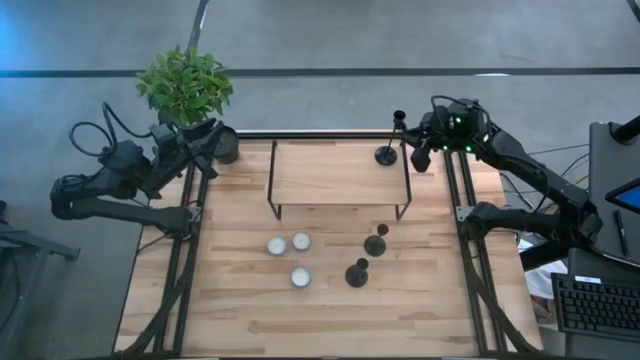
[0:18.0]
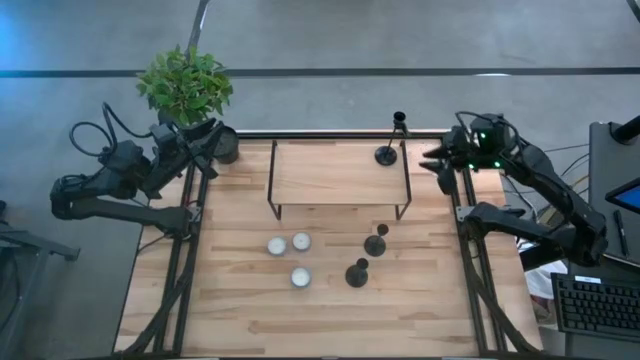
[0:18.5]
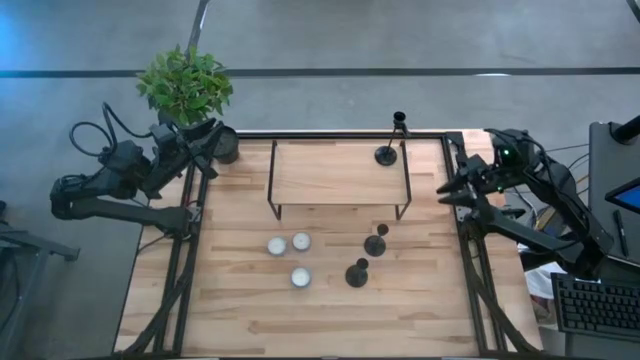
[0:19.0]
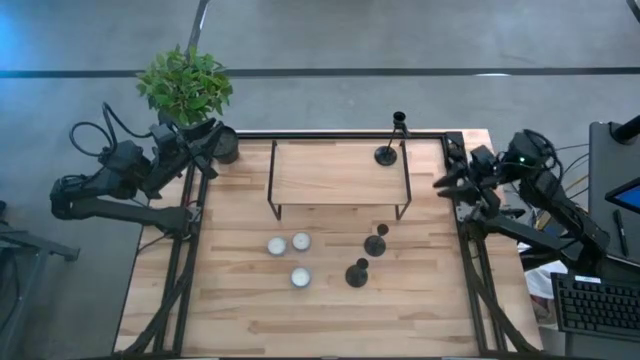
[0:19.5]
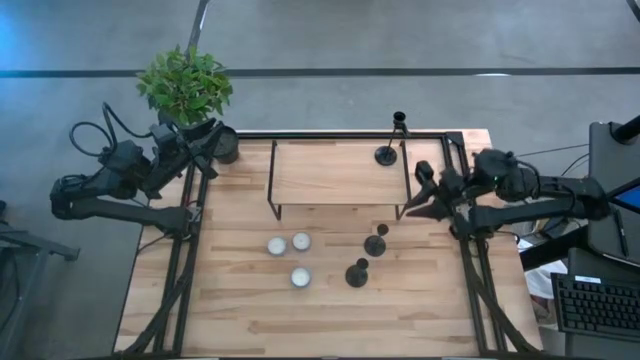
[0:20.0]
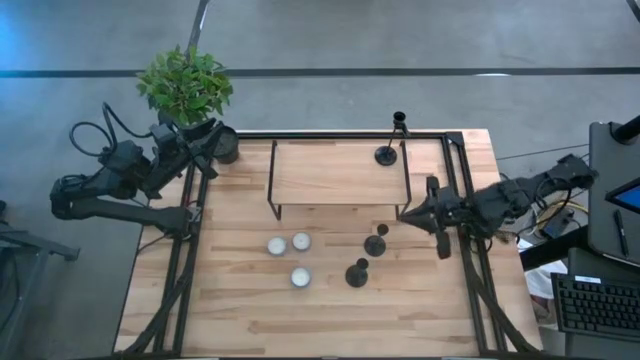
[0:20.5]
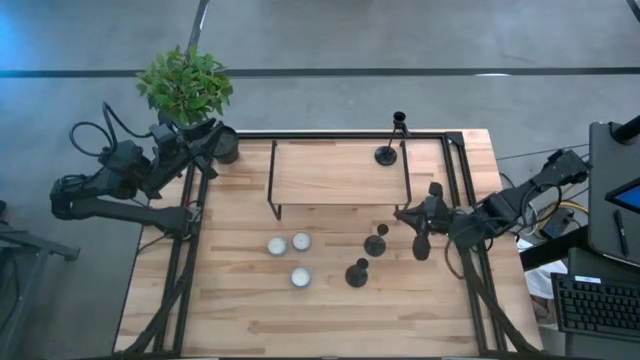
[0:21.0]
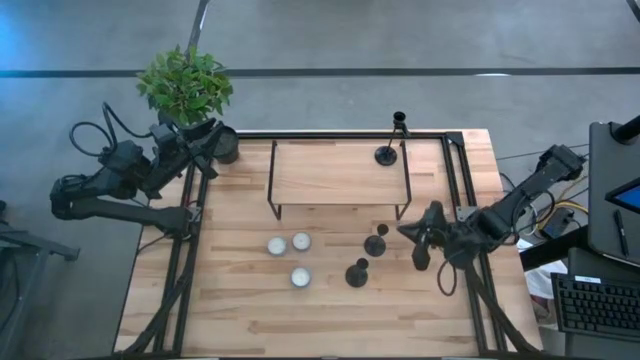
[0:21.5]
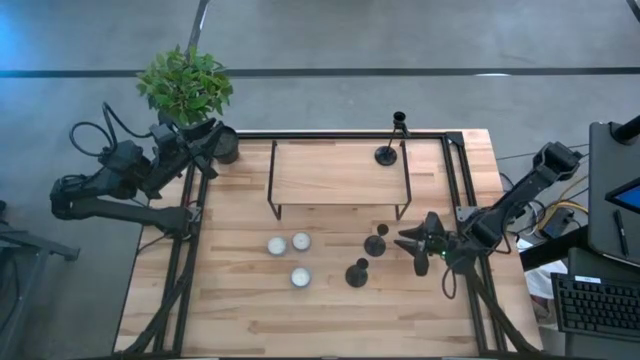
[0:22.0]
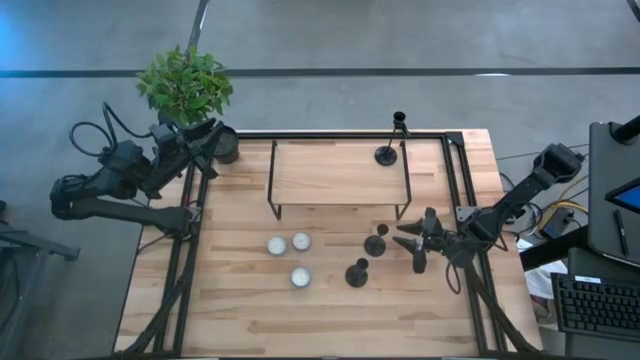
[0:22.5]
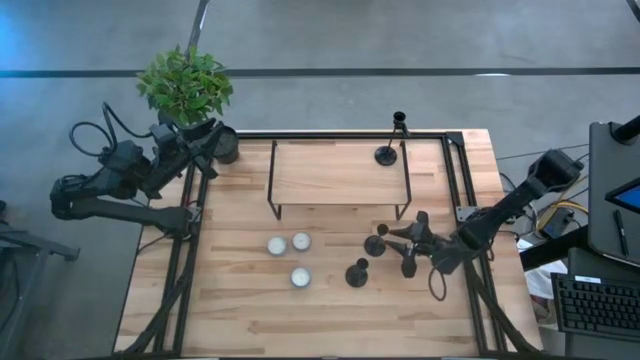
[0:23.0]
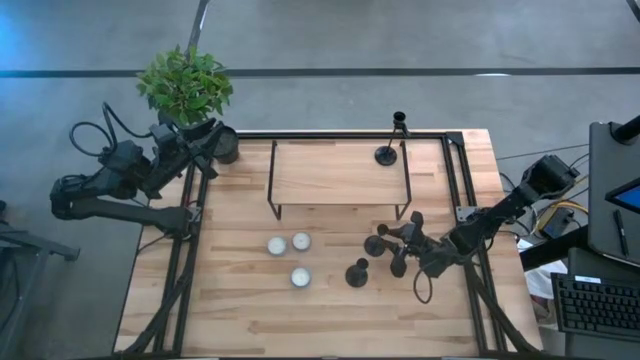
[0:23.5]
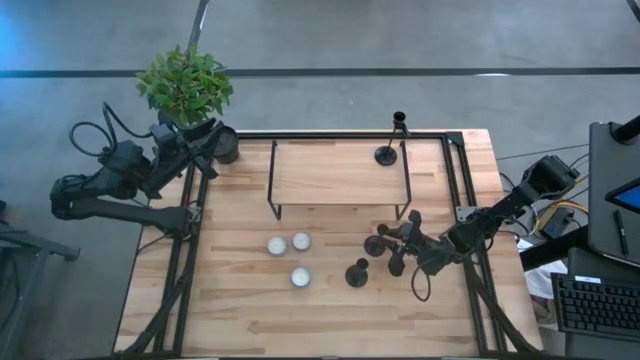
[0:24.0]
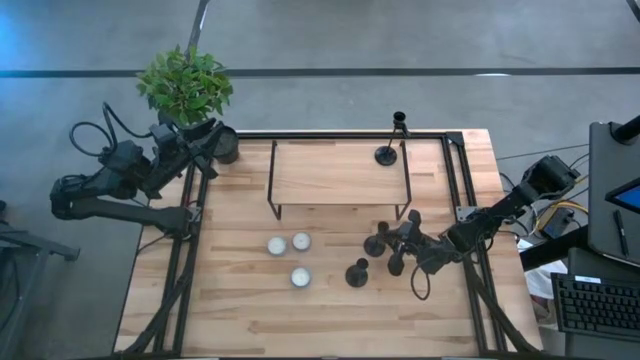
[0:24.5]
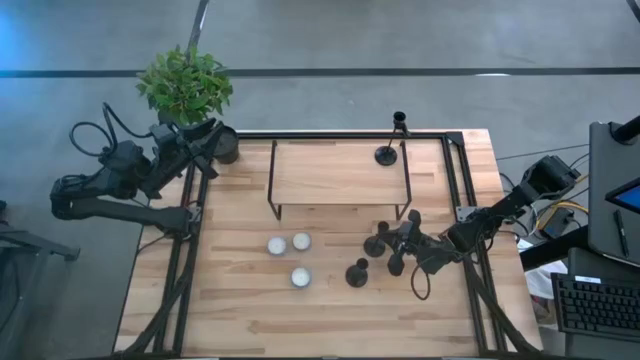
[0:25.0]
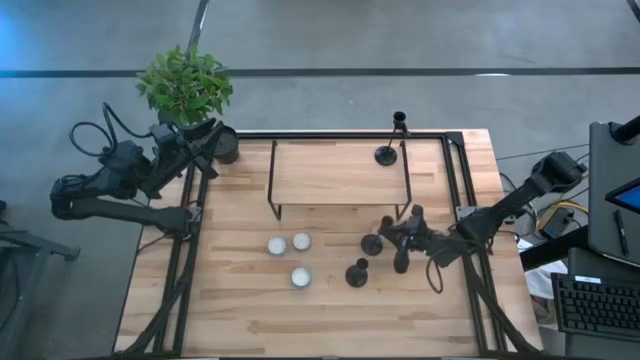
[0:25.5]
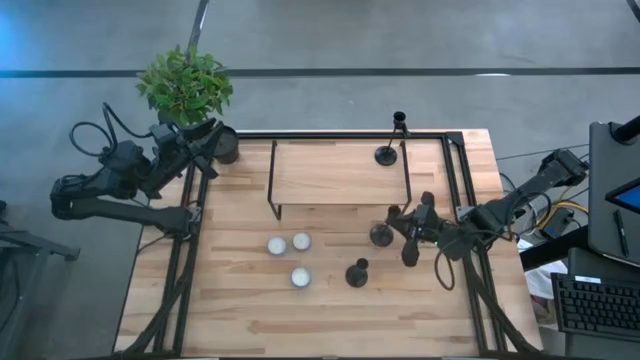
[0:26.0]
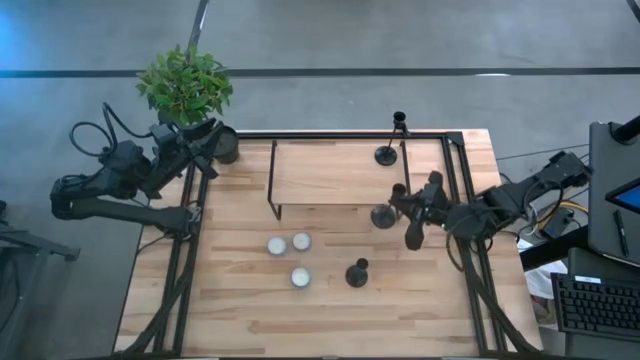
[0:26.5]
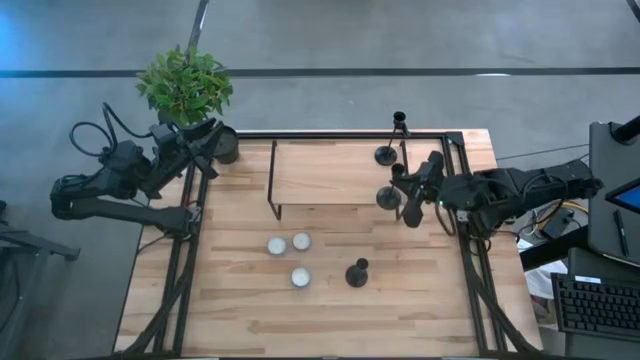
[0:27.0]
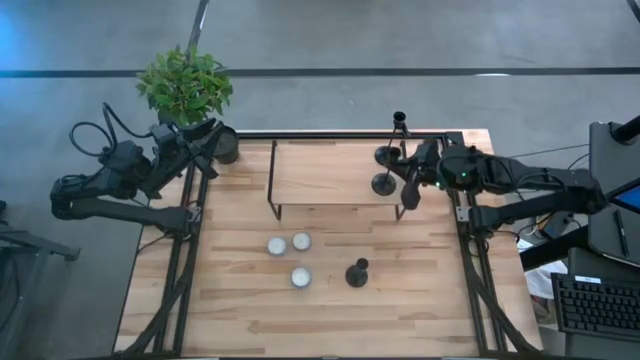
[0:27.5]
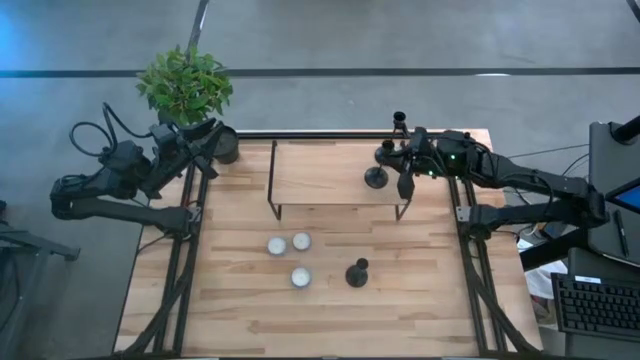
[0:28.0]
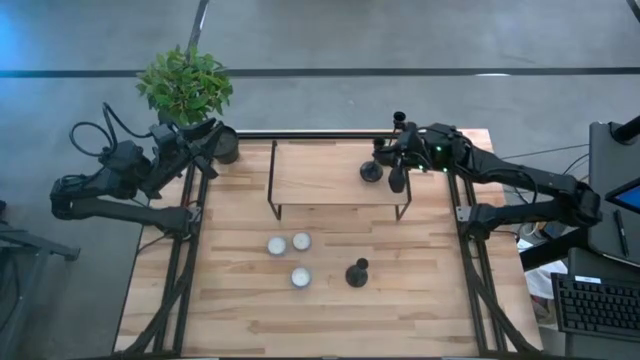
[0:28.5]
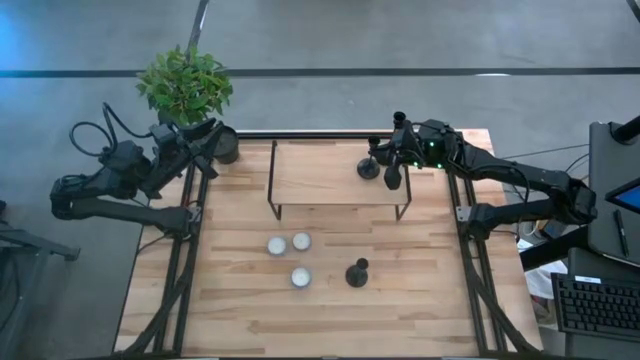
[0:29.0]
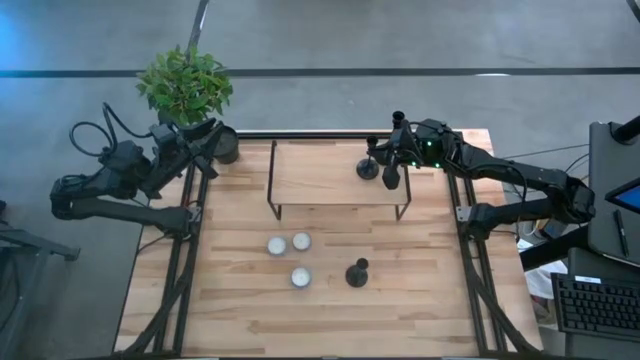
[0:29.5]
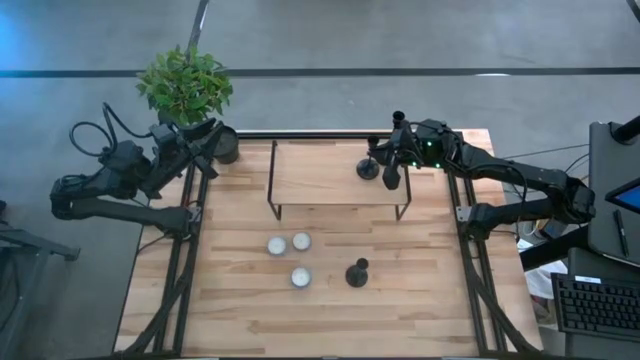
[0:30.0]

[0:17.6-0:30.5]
Task: Pick & Place candle stick holders
Put the top black candle holder on the shelf

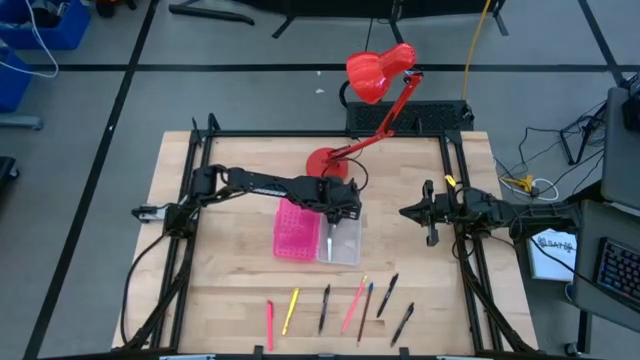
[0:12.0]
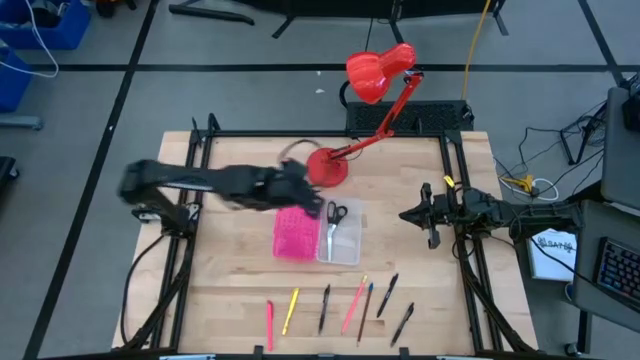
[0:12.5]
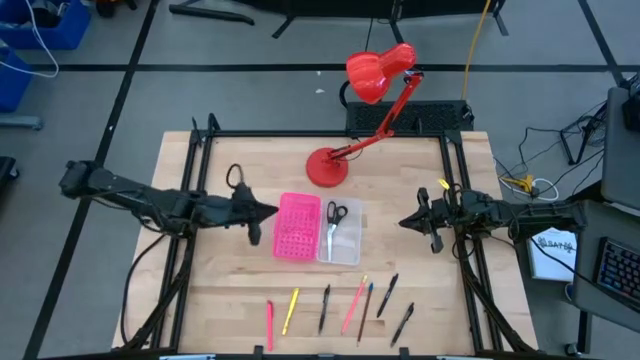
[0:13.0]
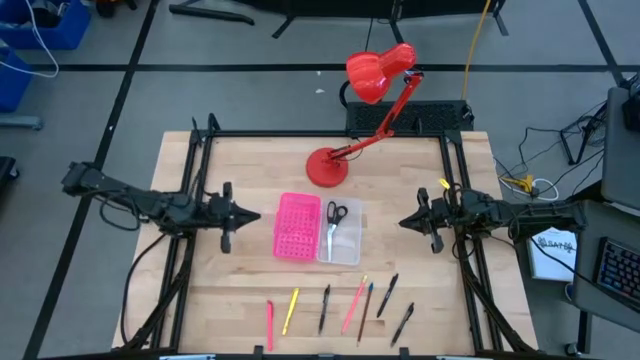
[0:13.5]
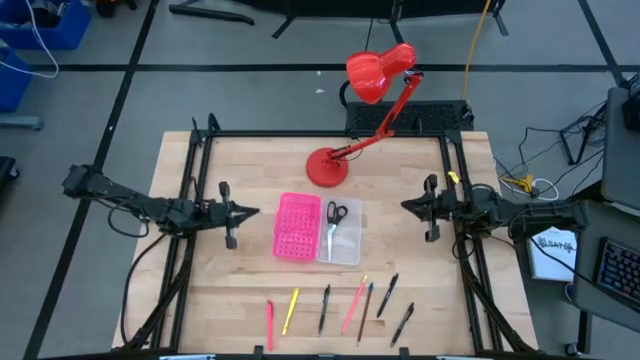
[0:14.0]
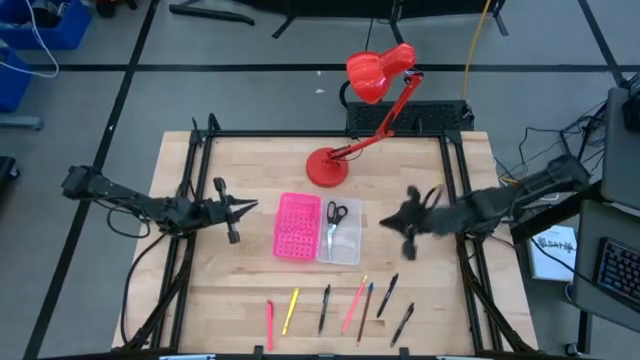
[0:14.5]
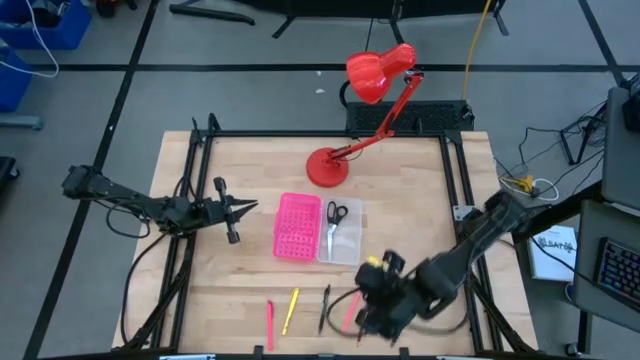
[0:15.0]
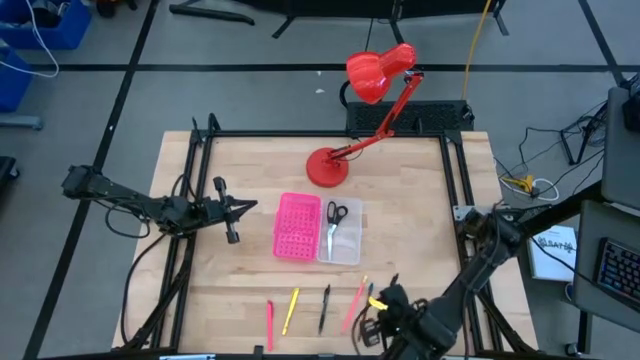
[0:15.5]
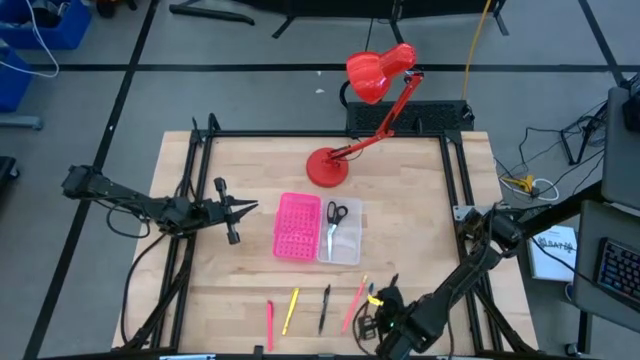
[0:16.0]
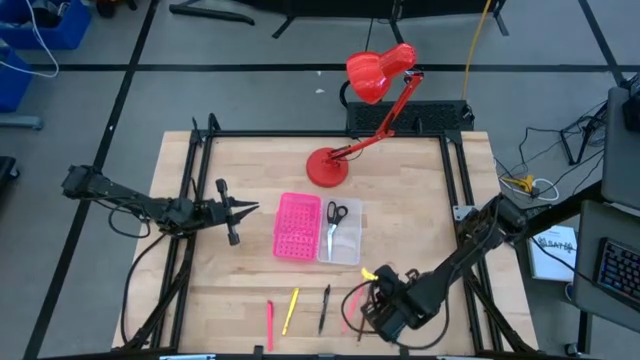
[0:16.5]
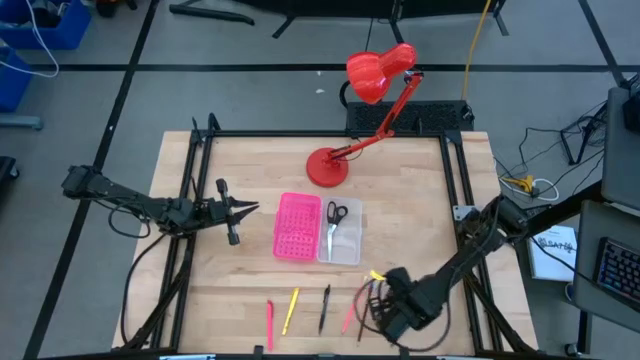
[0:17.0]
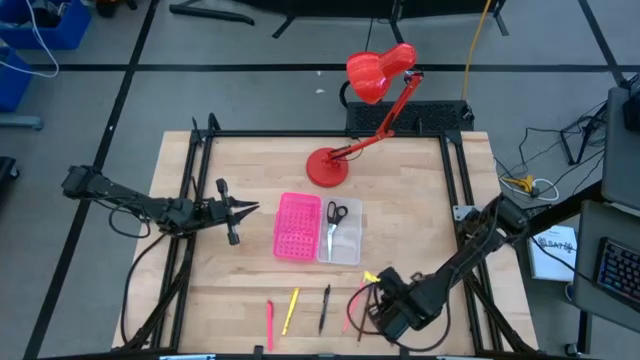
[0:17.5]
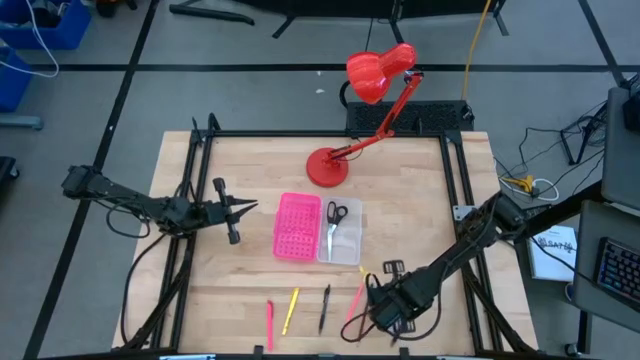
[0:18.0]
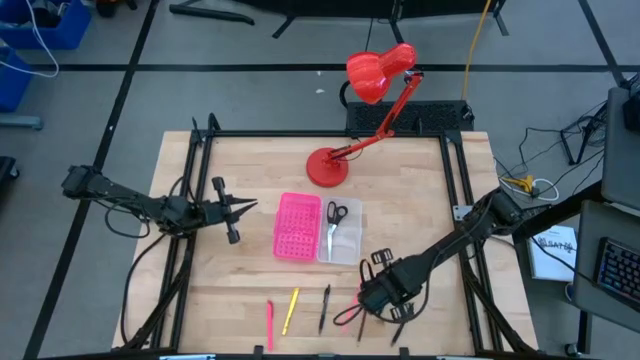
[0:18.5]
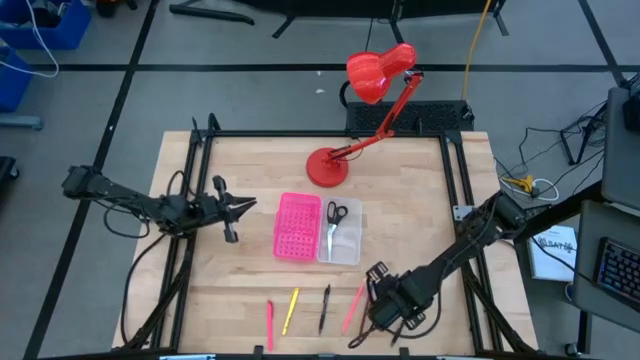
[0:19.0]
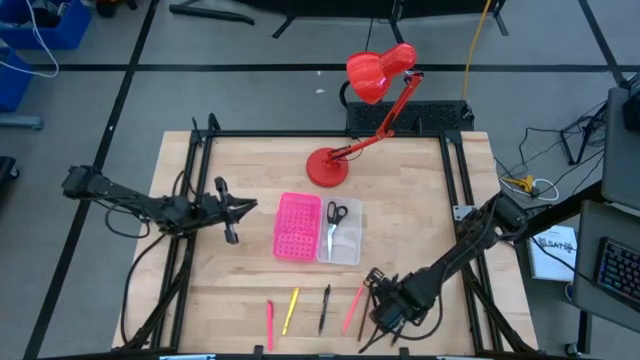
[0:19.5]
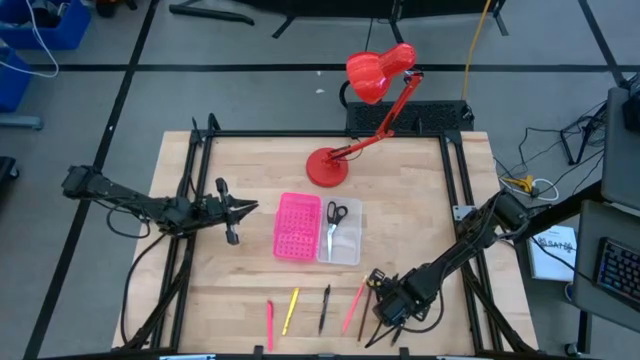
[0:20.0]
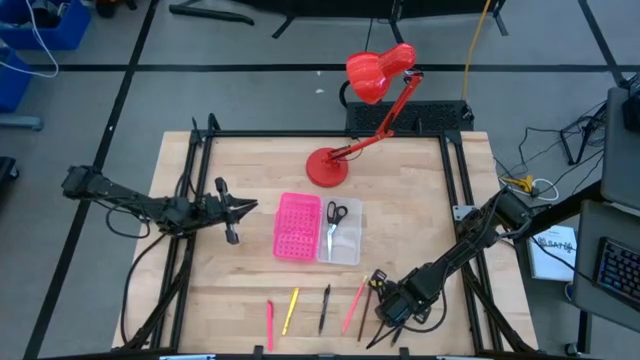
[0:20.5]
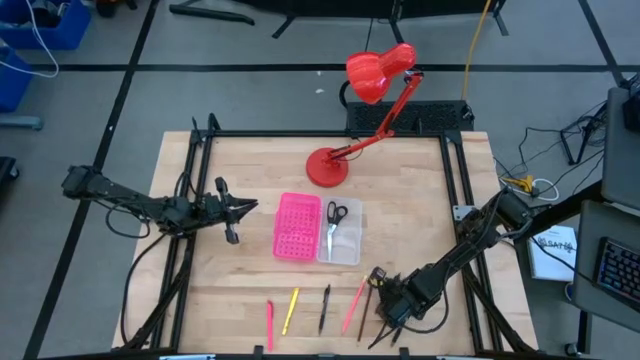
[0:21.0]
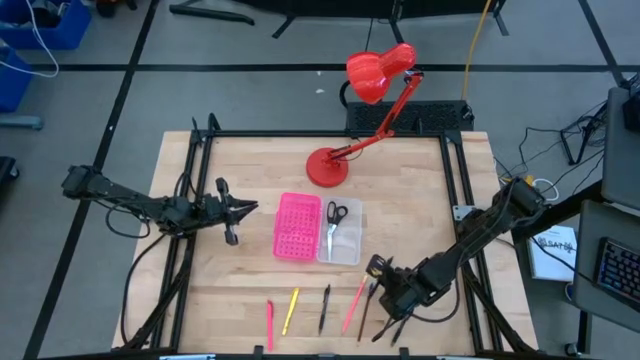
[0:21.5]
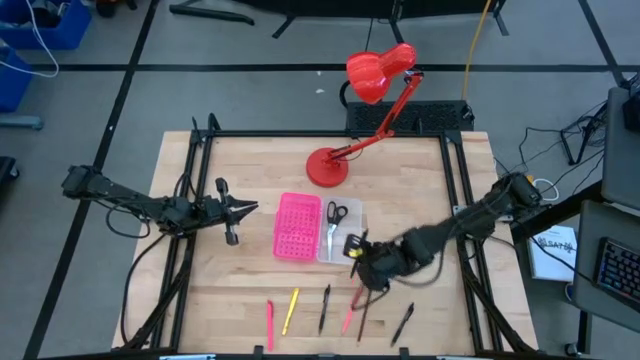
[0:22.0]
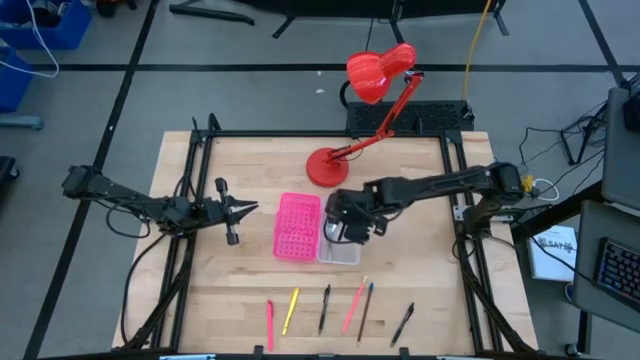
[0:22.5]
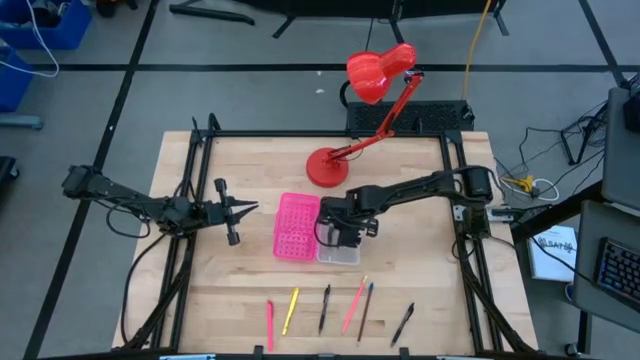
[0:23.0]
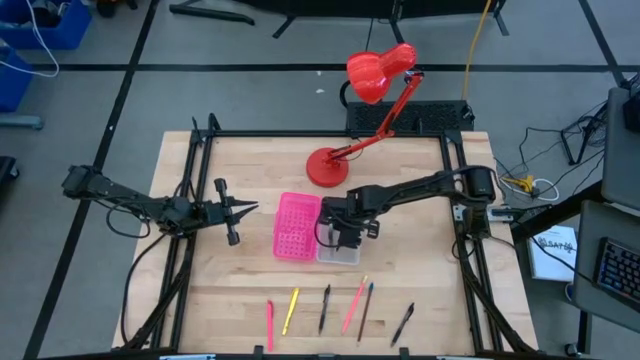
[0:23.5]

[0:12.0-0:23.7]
Task: Pick & place school supplies into a supply box
Put the black pen into the pink supply box
